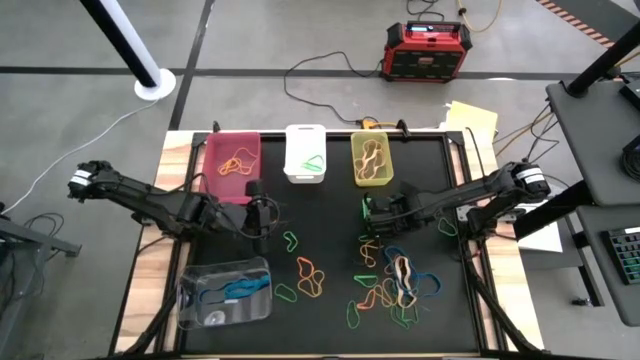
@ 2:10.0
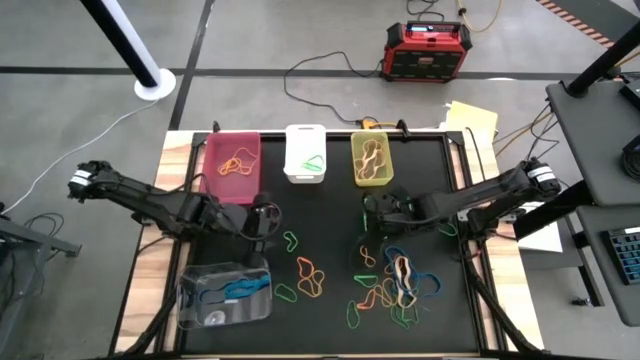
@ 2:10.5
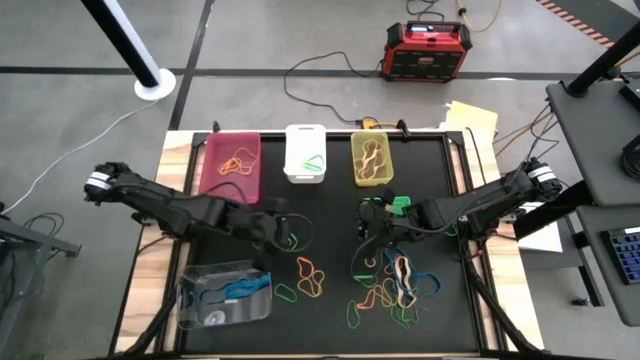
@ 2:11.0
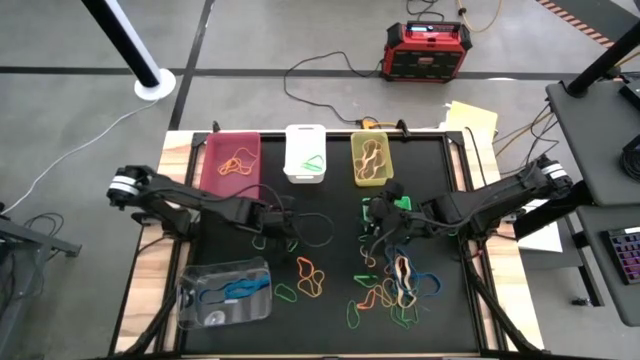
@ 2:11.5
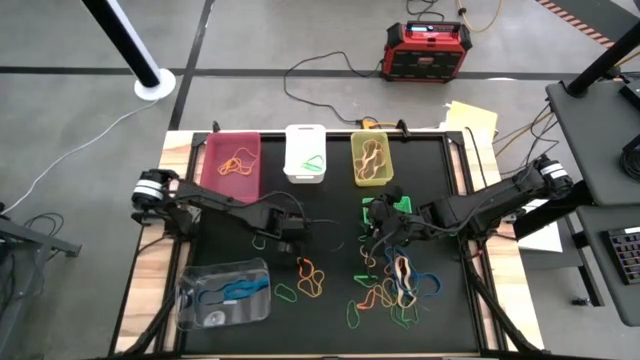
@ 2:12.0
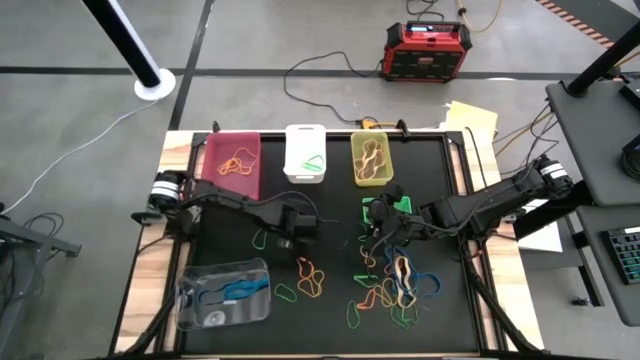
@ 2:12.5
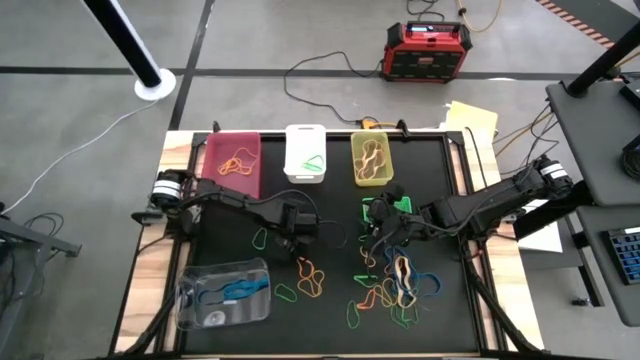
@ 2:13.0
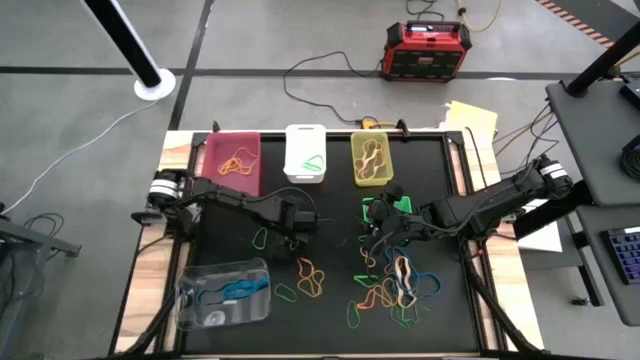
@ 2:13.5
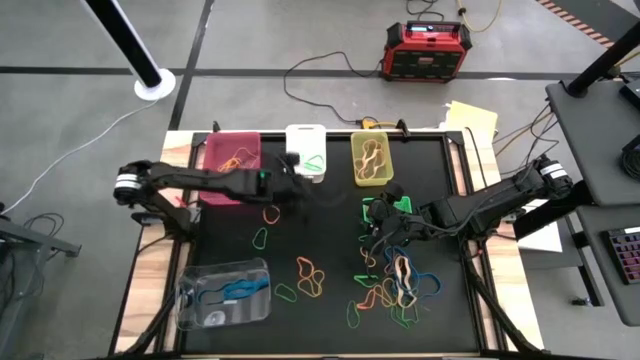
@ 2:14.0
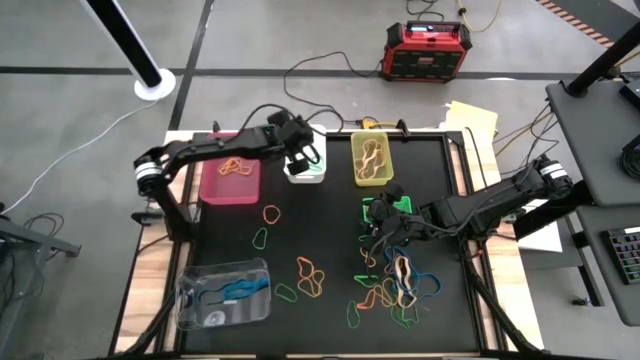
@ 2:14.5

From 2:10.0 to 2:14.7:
Task: Sort rubber bands into baskets
Put the green rubber band into the white bin

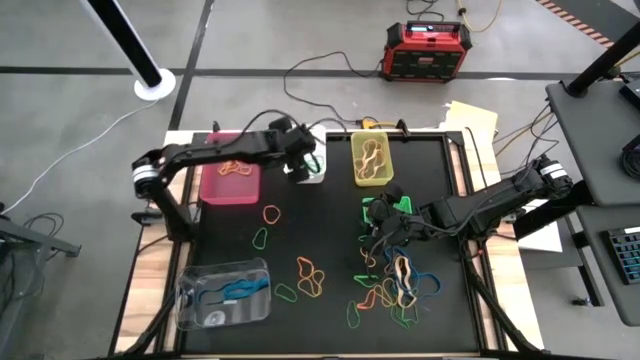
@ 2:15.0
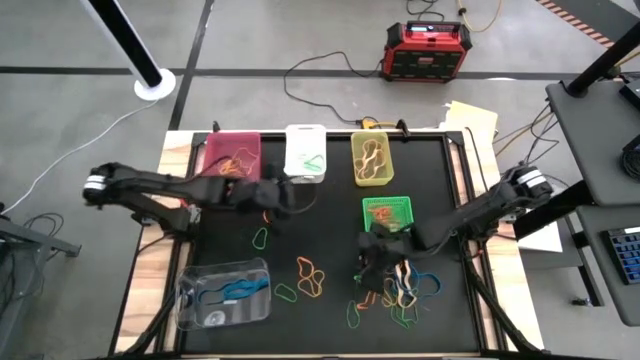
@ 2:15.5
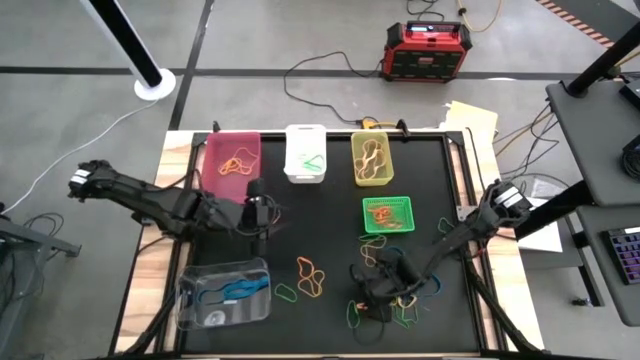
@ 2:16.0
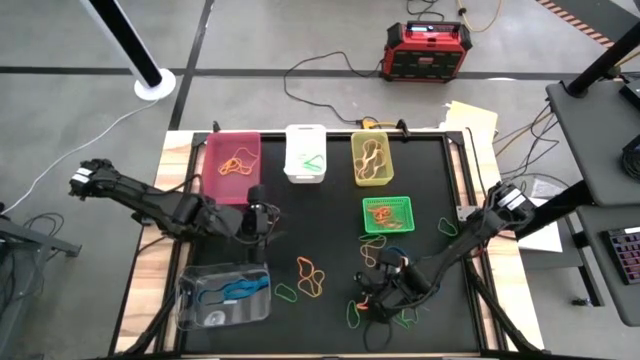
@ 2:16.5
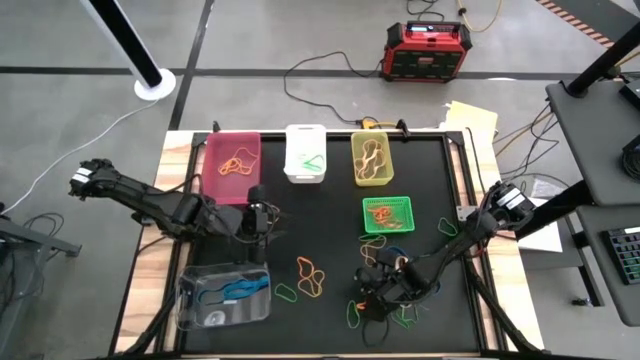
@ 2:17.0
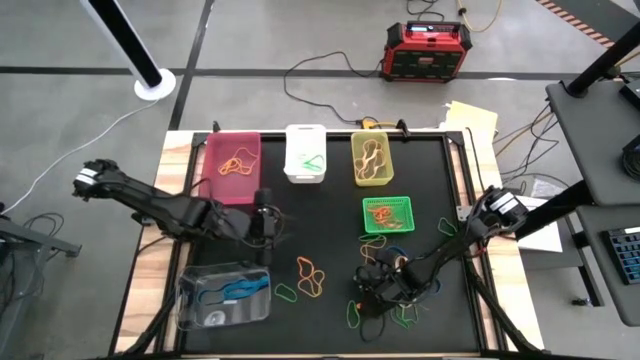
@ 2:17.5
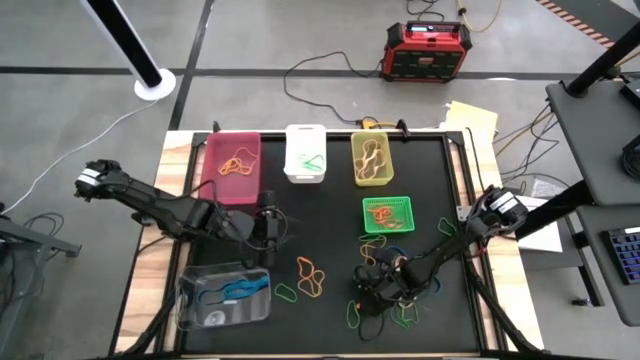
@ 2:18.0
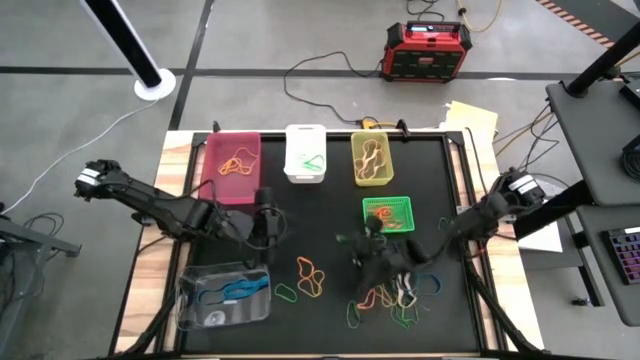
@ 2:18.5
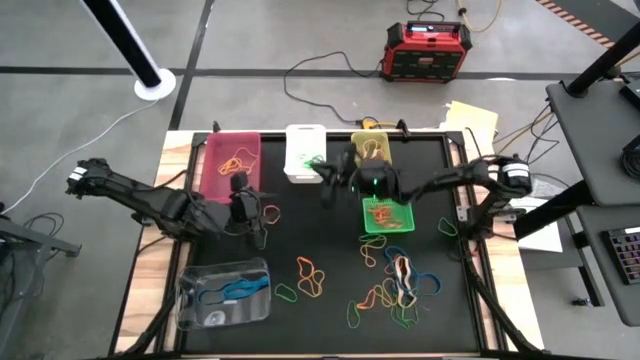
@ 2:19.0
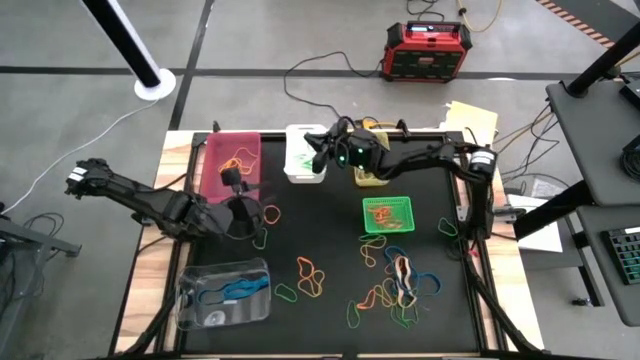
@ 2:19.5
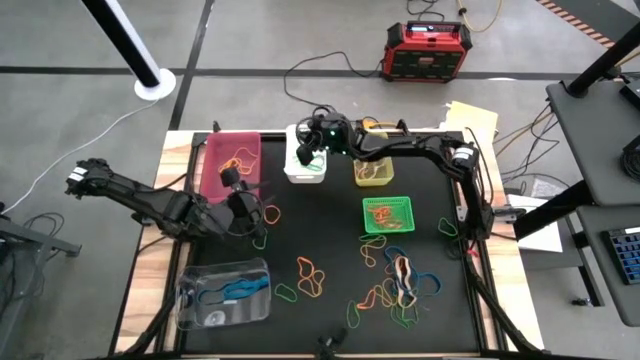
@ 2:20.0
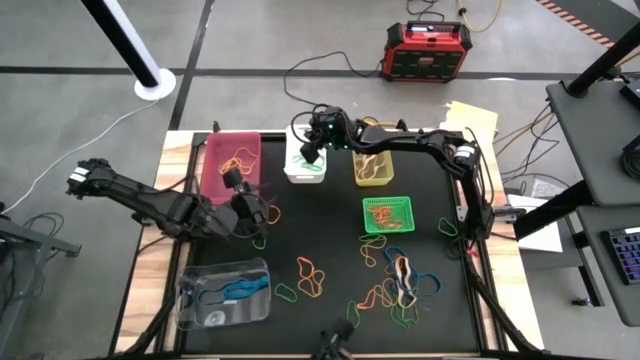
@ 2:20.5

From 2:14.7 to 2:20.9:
Put the green rubber band into the white bin

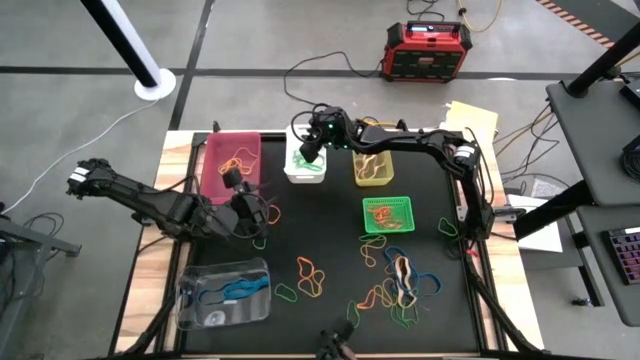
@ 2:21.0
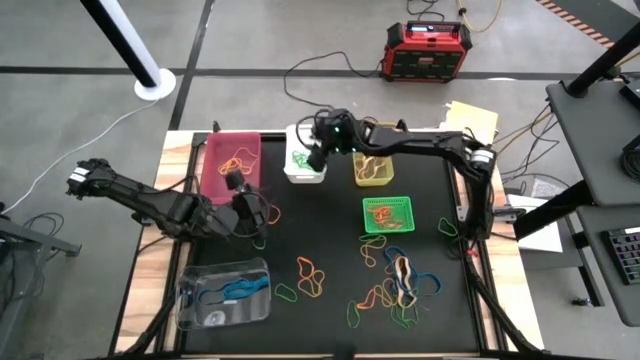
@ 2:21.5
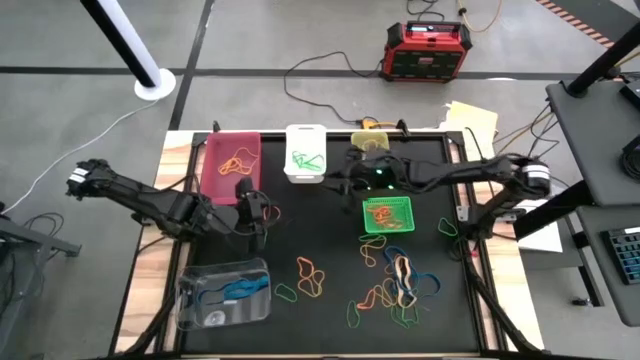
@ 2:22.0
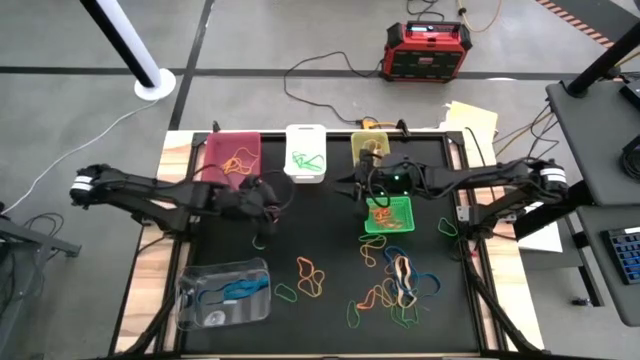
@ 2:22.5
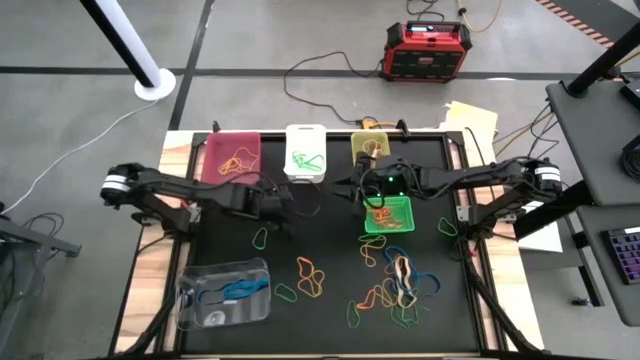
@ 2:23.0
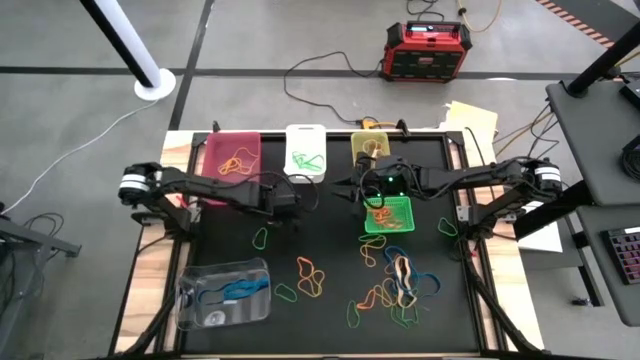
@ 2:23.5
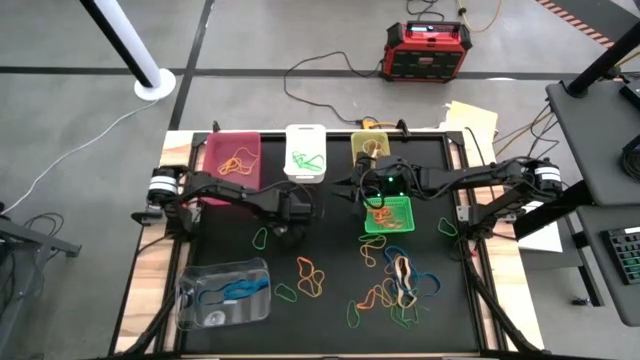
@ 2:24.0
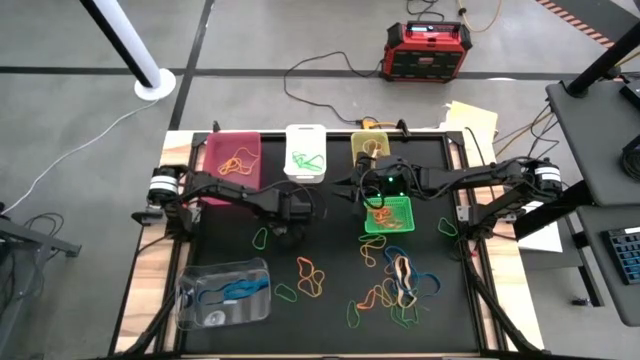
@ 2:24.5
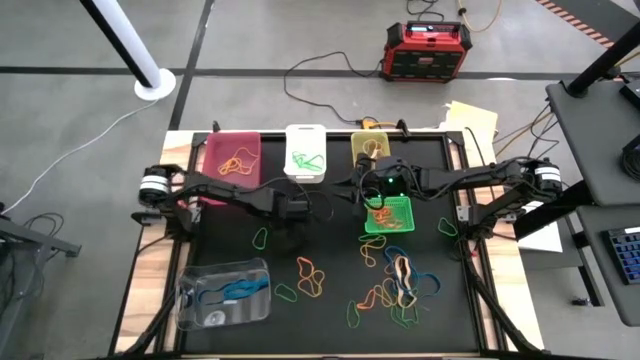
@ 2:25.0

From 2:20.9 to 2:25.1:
Put the orange rubber band into the green bin

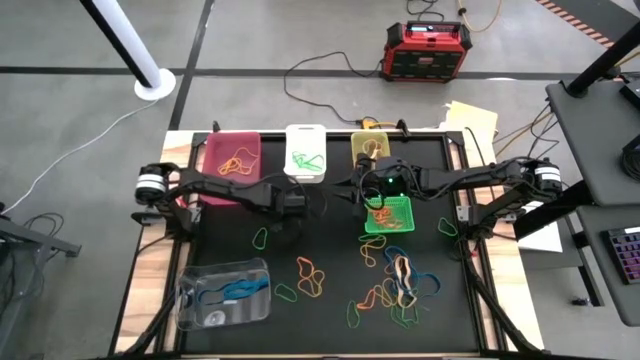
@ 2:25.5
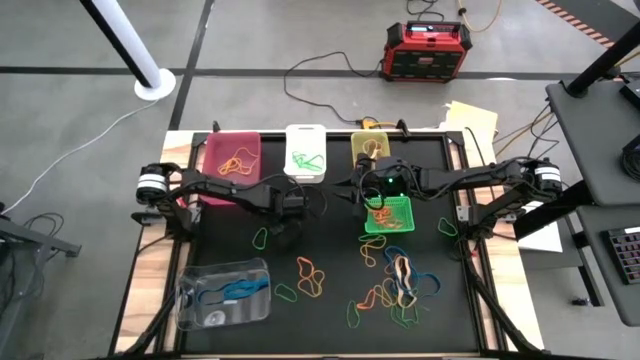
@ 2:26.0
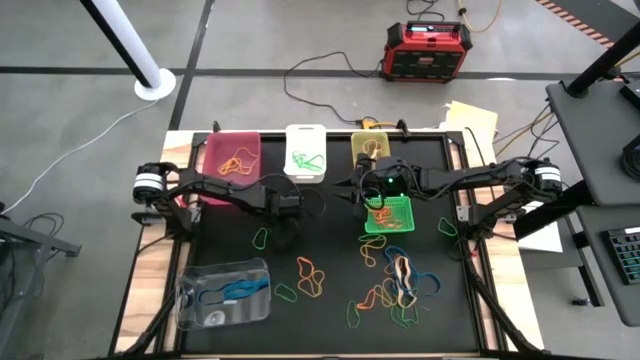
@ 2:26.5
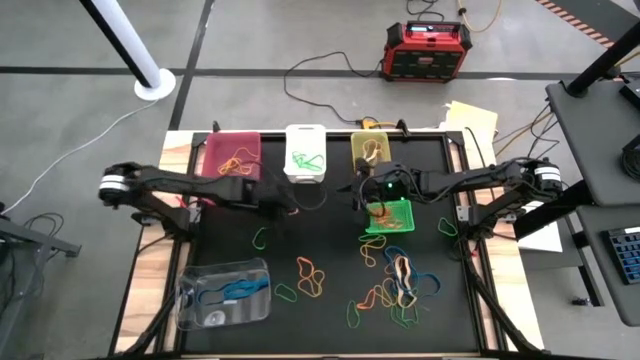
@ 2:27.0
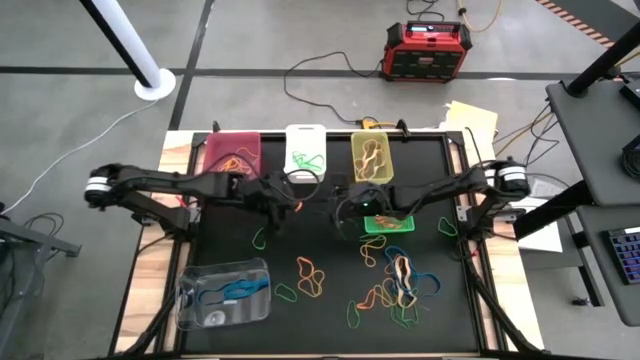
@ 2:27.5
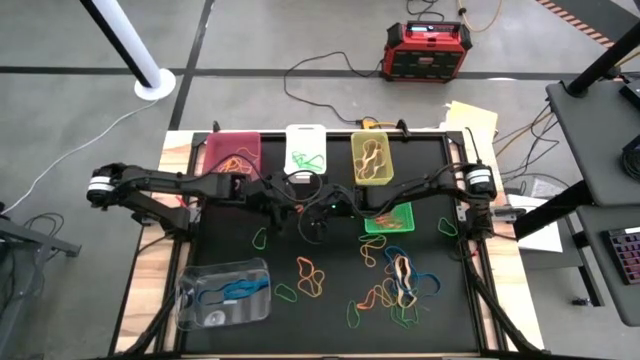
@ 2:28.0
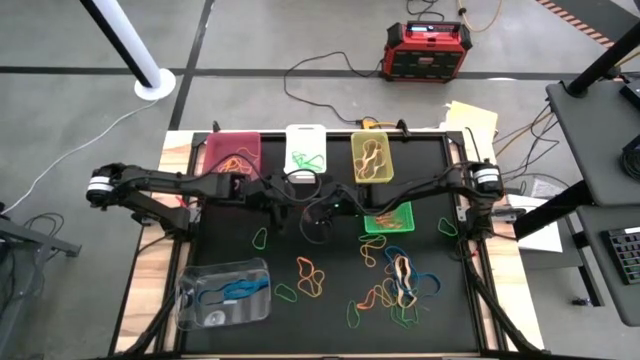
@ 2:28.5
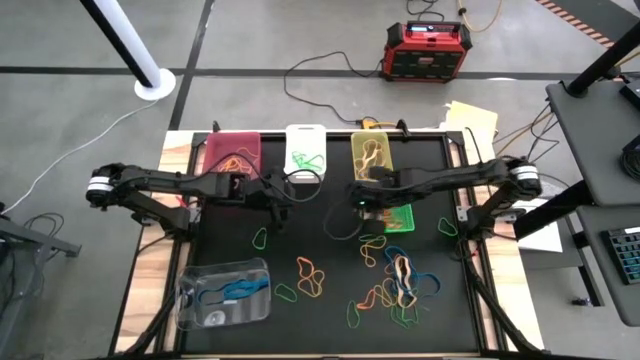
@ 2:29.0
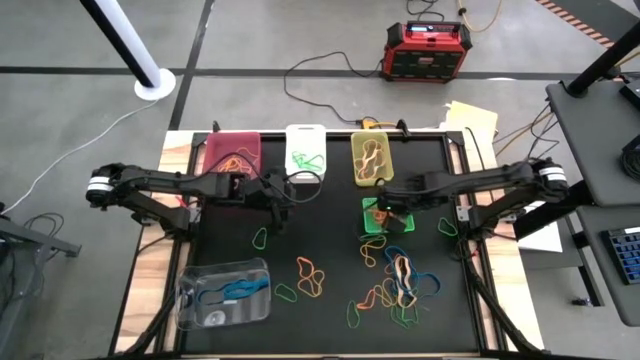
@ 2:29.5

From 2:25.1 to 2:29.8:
Put the orange rubber band into the green bin

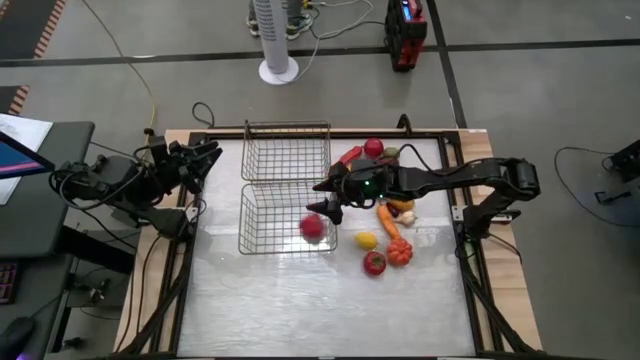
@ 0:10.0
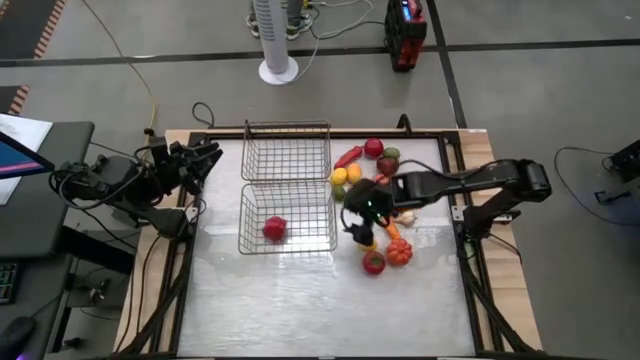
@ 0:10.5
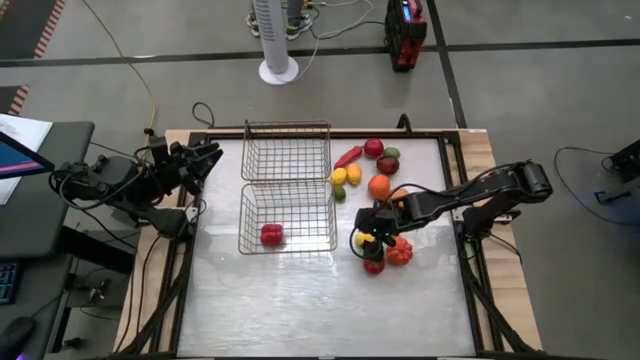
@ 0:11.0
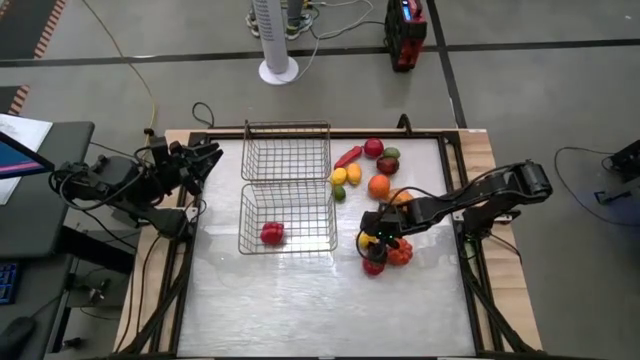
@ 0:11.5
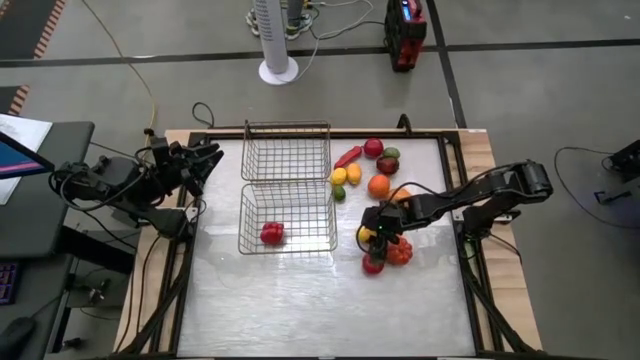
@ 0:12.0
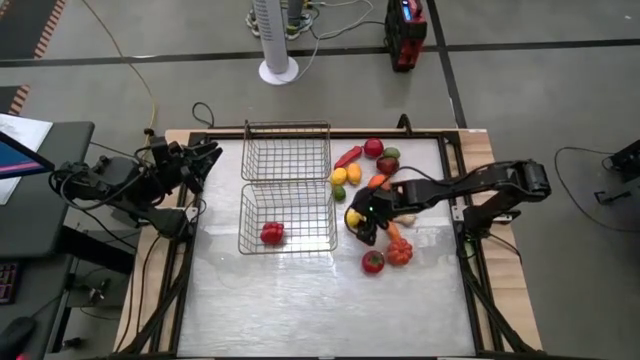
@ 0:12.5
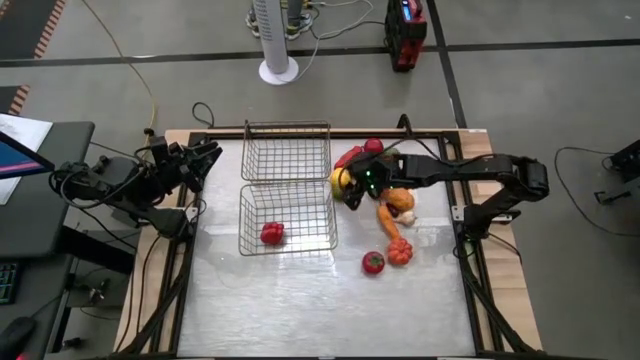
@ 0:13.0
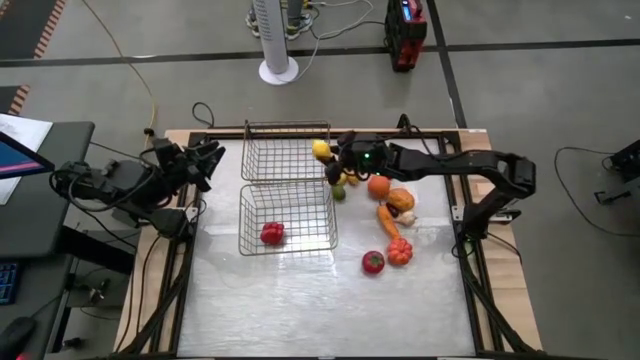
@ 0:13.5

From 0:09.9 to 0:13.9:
Task: Sort produce into baskets
Put the yellow lemon into the top mesh basket
